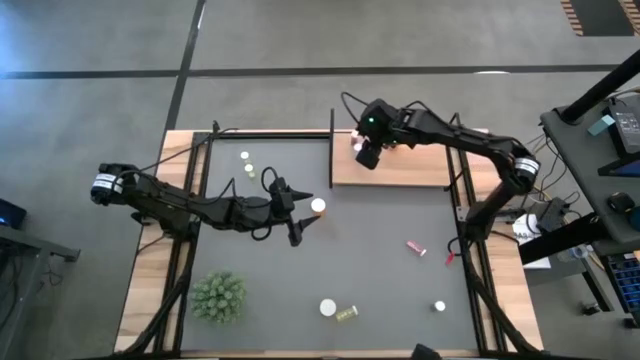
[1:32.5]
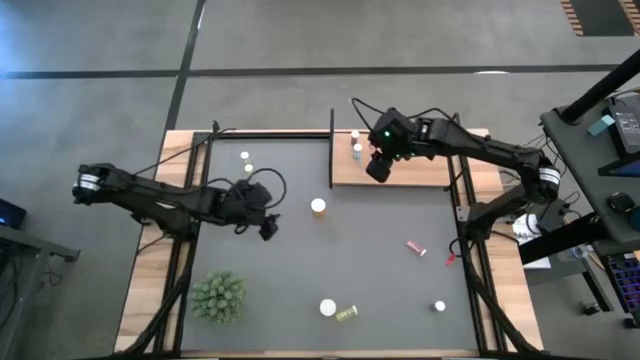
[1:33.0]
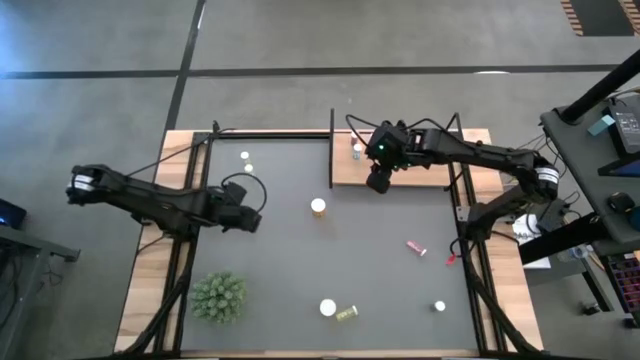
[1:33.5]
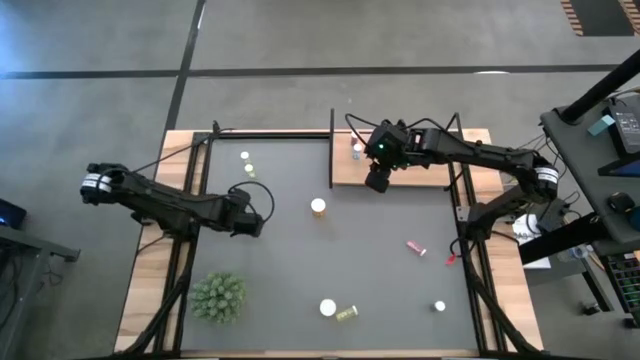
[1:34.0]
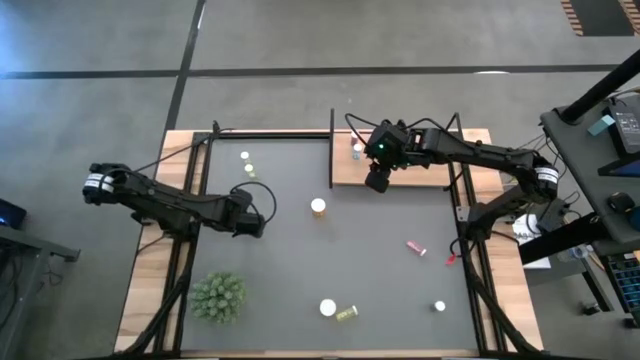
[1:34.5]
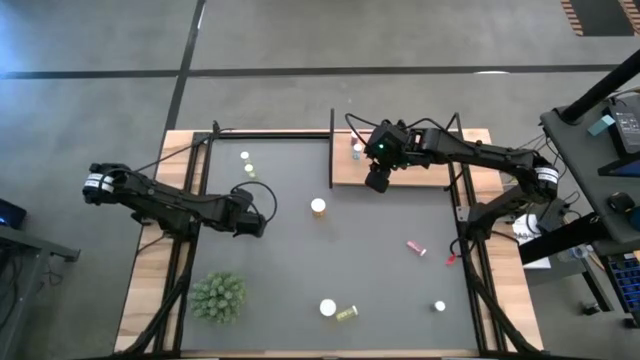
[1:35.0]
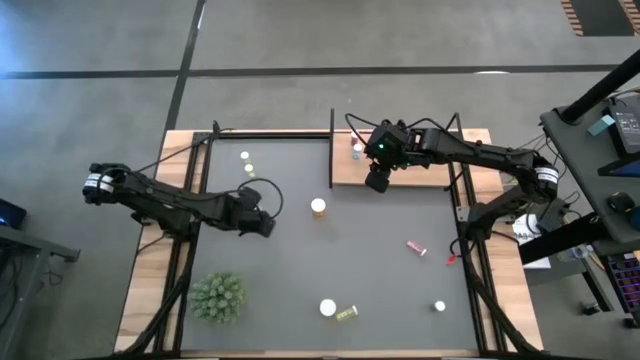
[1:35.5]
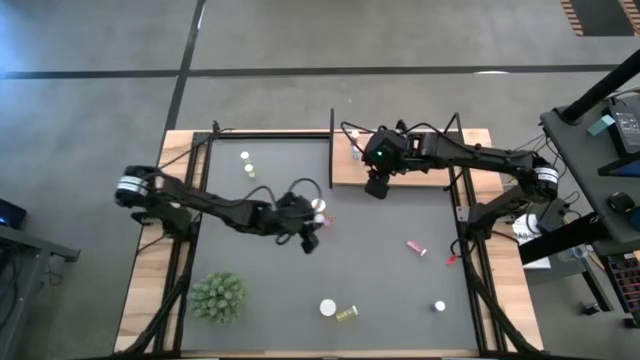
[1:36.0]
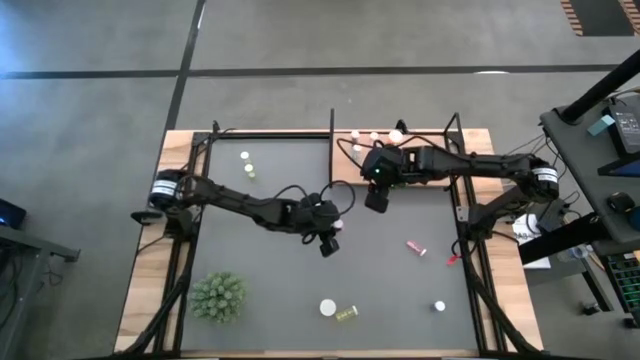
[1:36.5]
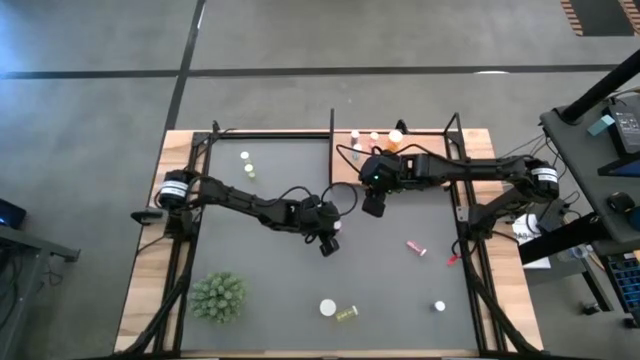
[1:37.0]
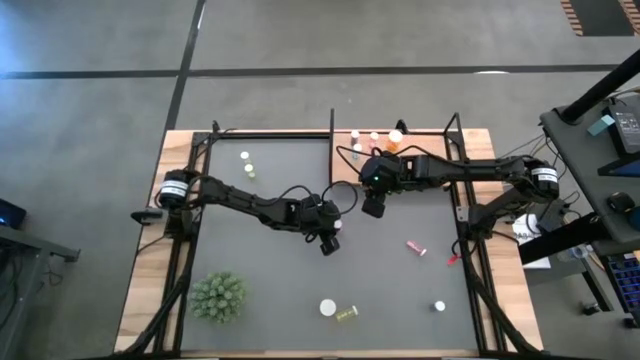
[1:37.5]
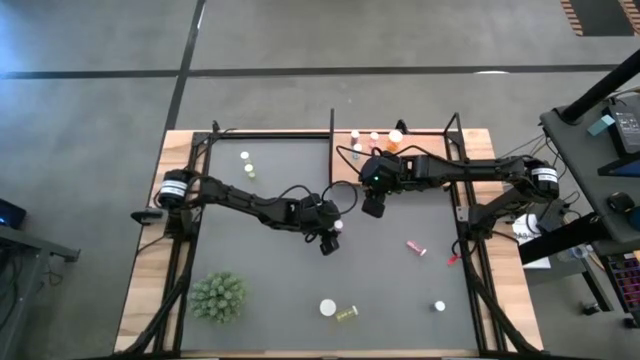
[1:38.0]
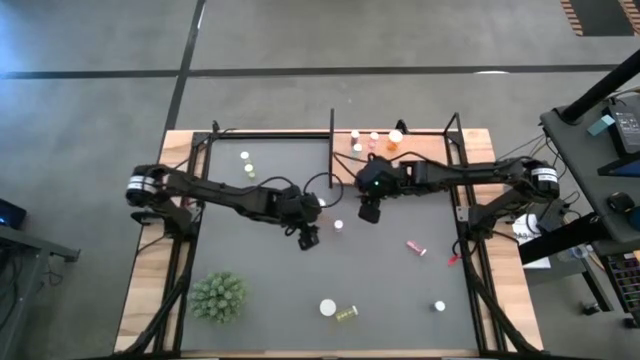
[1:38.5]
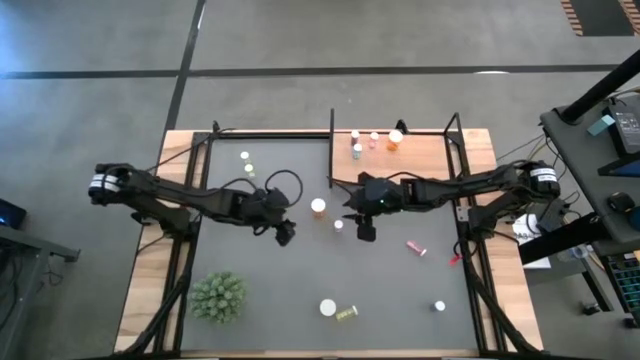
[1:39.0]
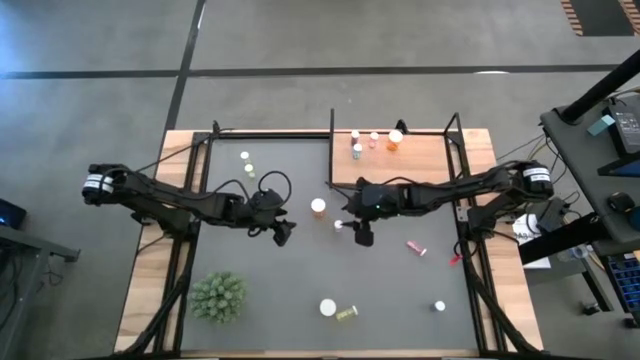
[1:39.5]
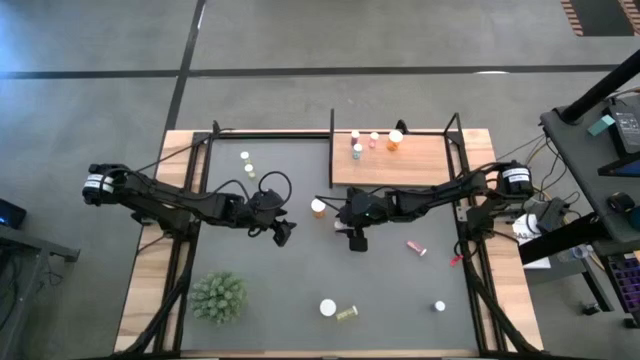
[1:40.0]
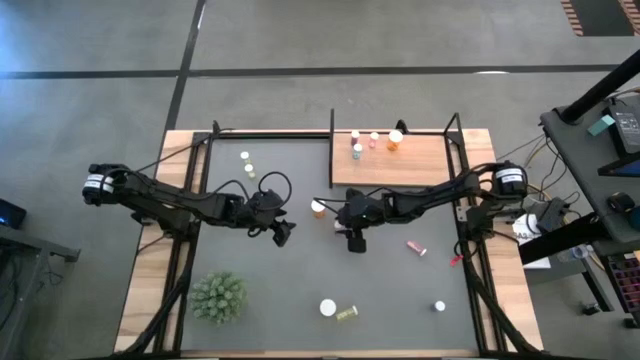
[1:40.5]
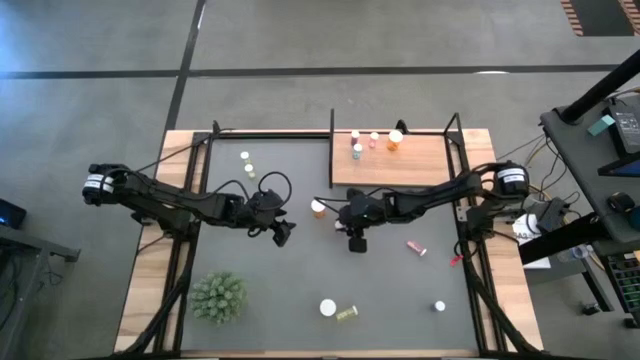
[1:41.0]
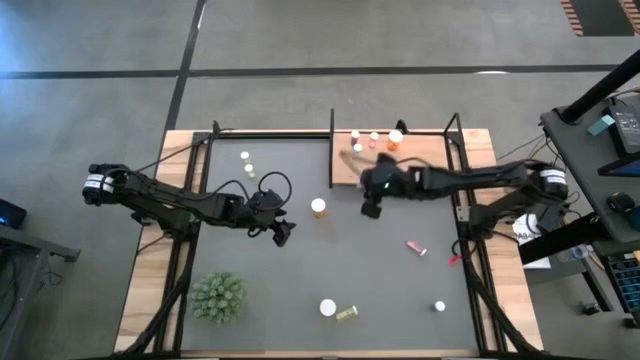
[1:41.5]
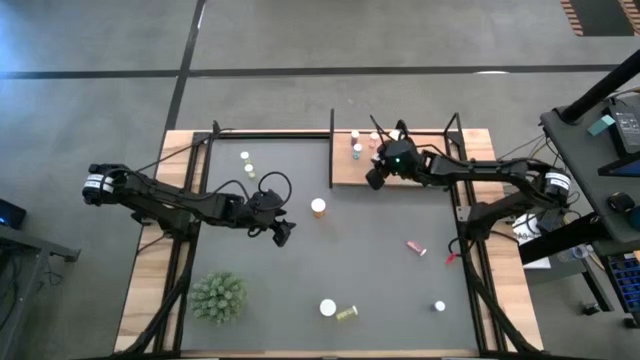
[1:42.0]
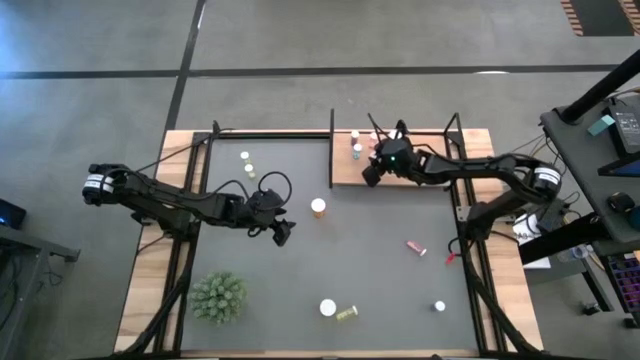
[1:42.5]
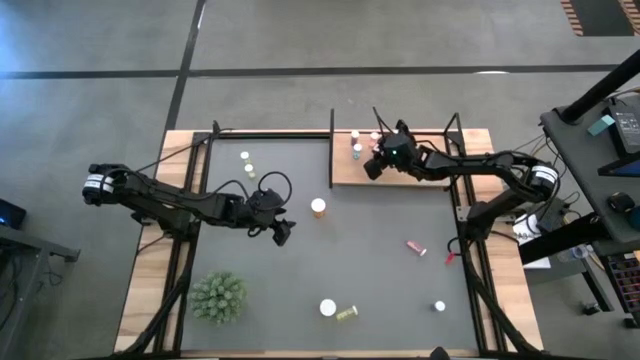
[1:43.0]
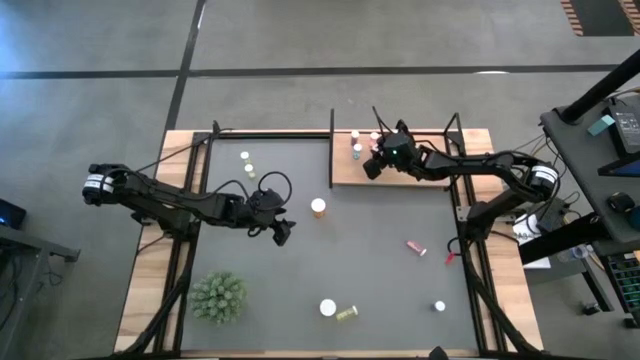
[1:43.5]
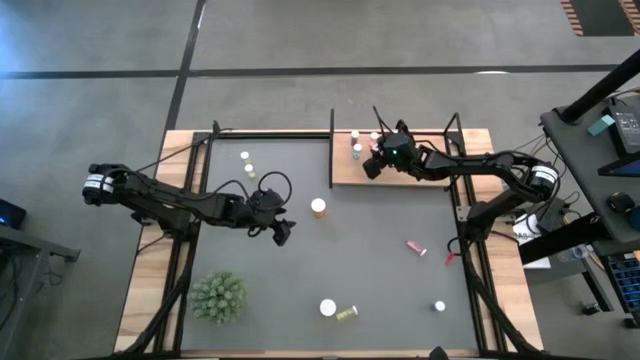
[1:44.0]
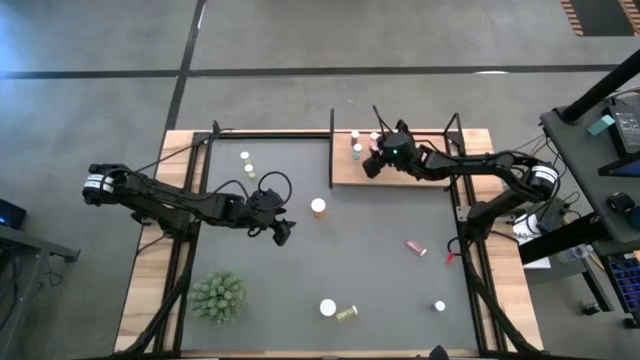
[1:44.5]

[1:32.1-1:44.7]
Task: Pick and place medicine bottles onto shelf by color
Put the left pink pill bottle on the shelf aligned with the other pink pill bottle

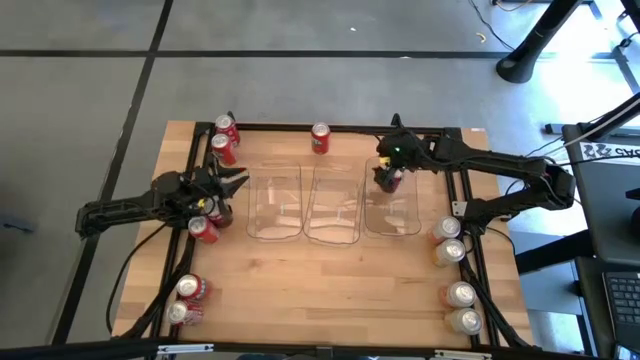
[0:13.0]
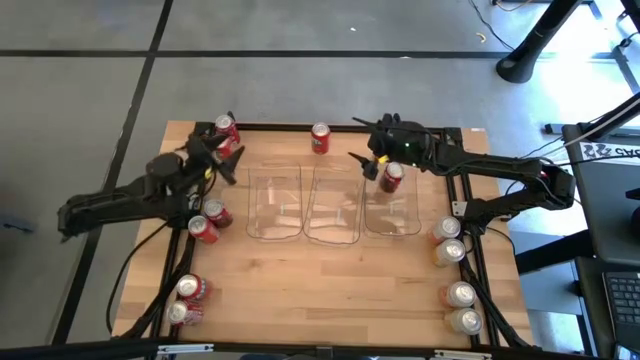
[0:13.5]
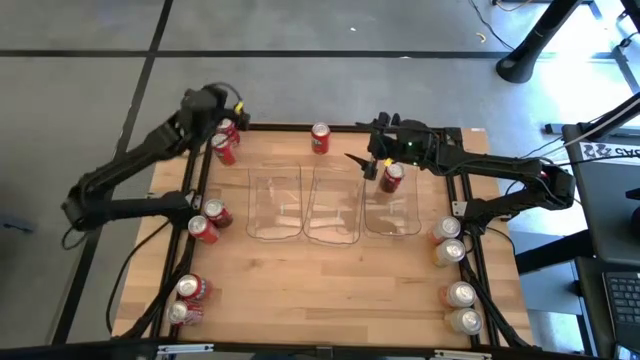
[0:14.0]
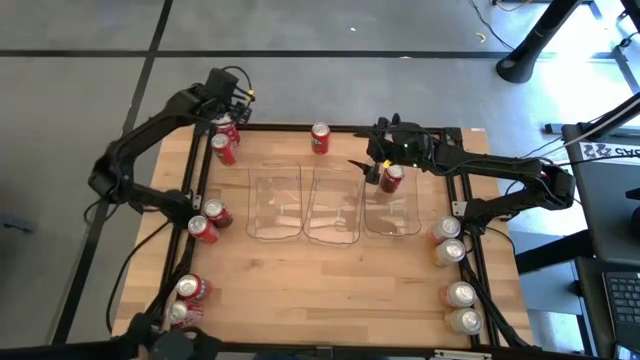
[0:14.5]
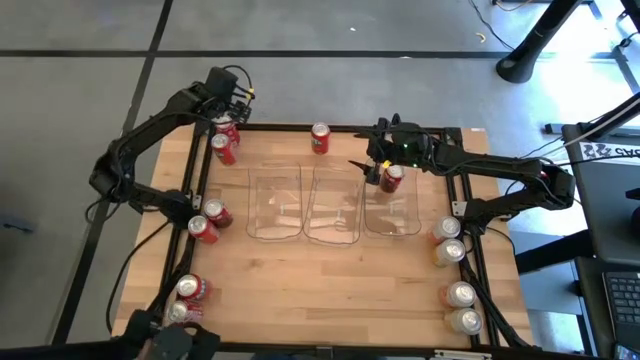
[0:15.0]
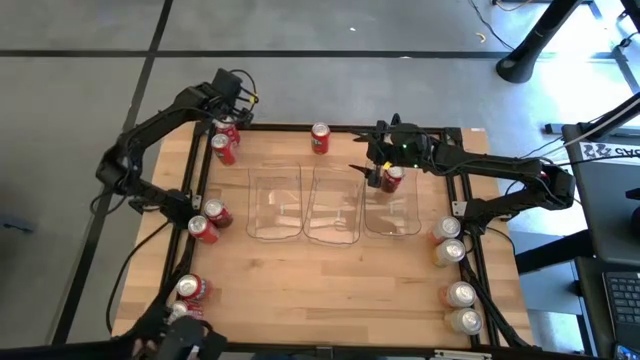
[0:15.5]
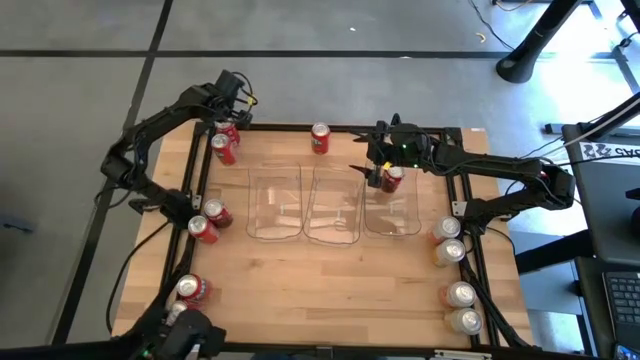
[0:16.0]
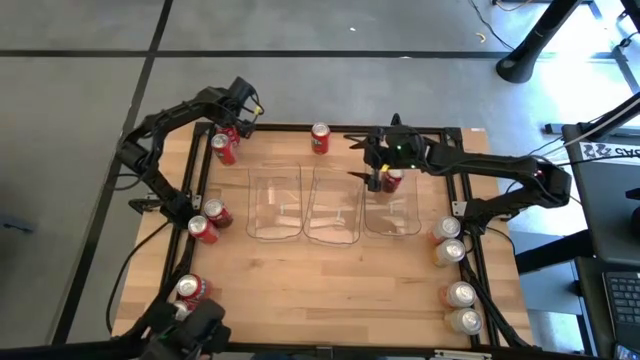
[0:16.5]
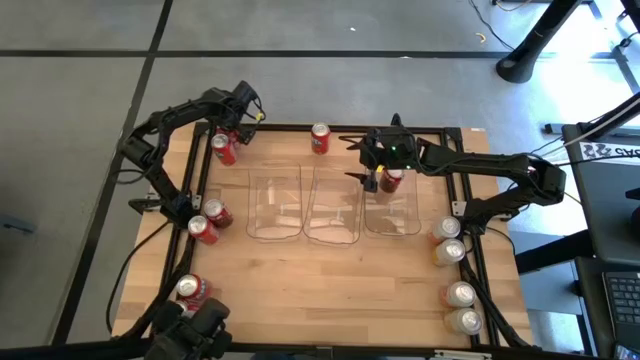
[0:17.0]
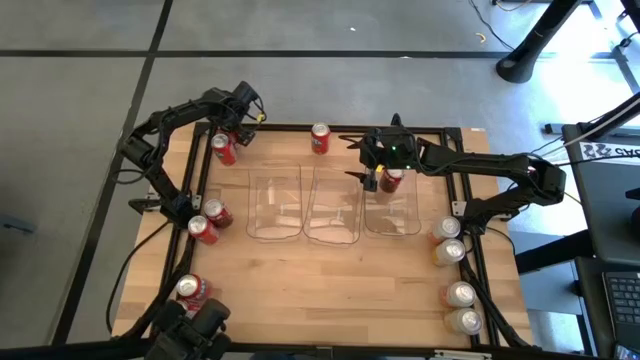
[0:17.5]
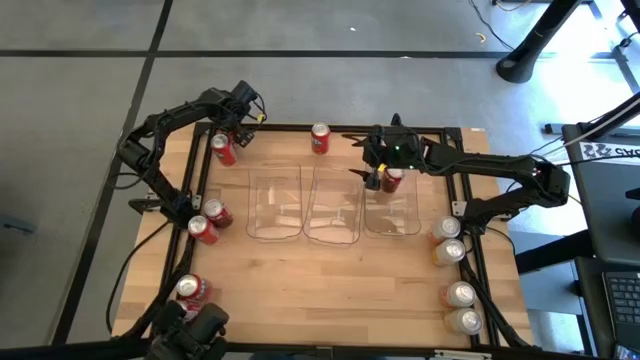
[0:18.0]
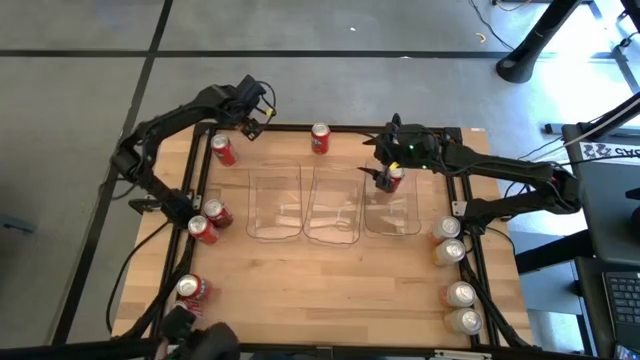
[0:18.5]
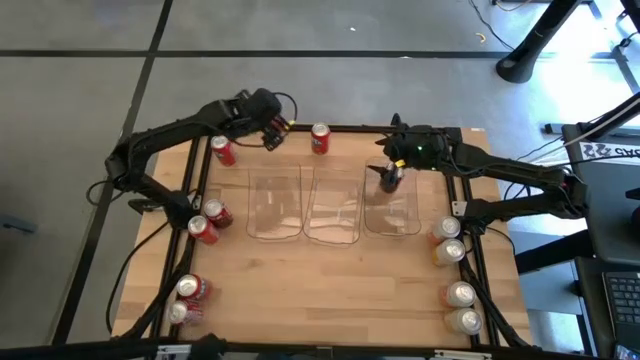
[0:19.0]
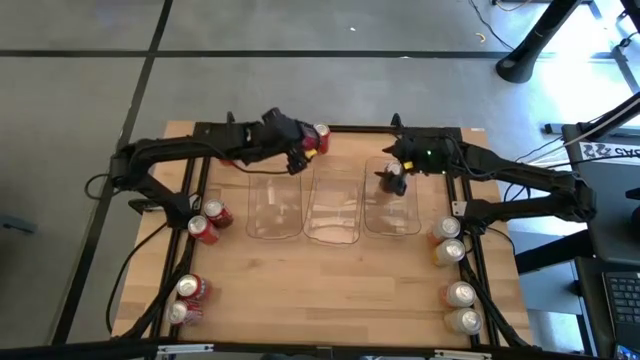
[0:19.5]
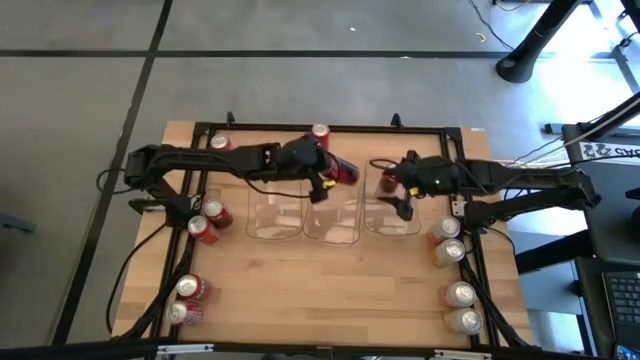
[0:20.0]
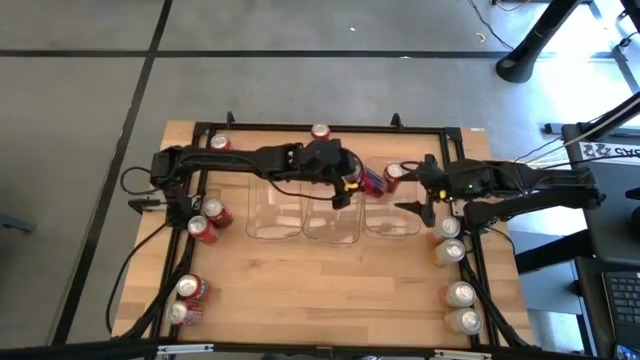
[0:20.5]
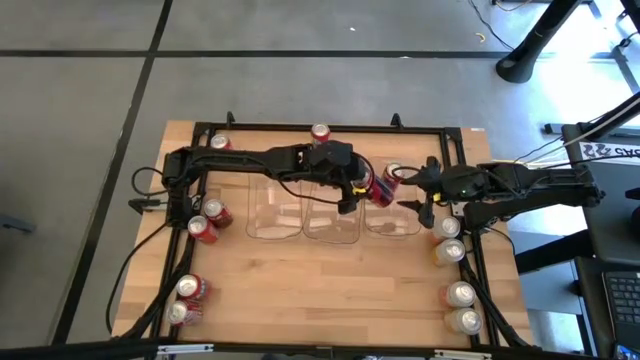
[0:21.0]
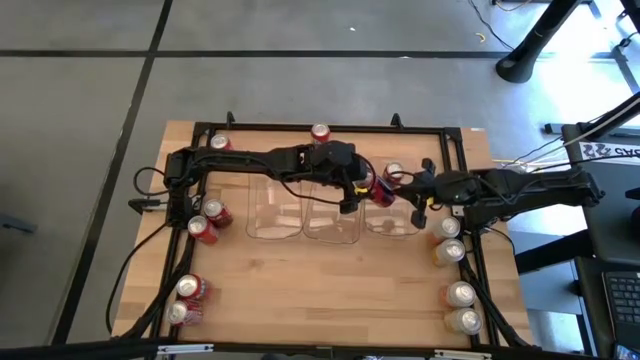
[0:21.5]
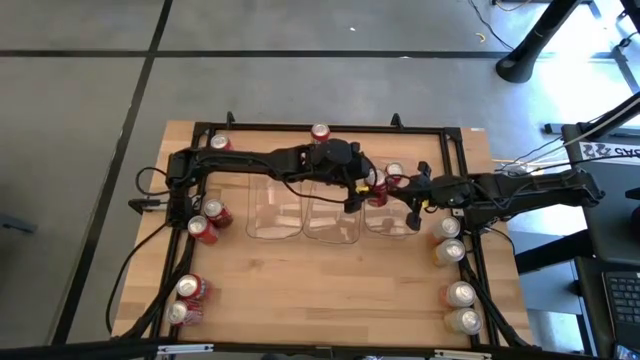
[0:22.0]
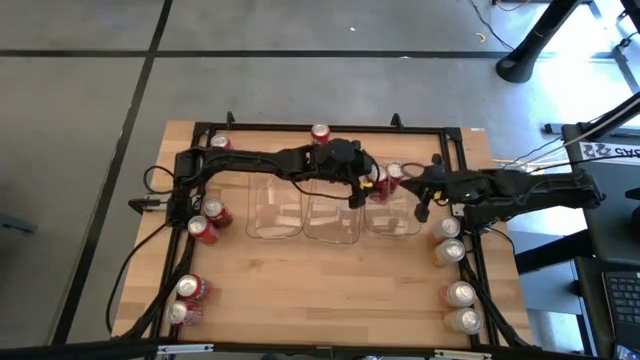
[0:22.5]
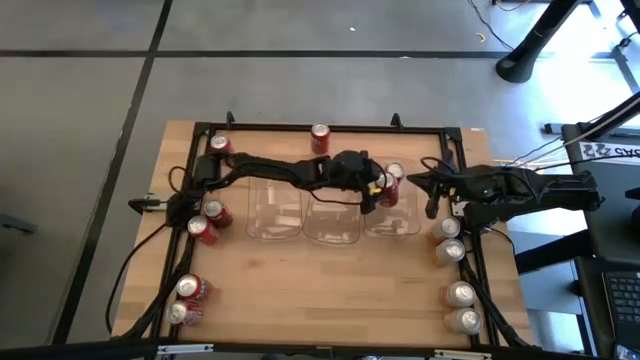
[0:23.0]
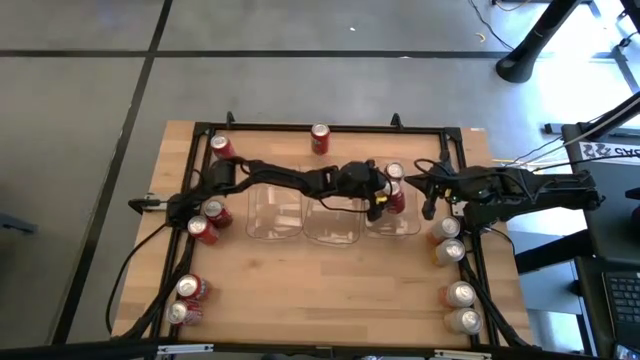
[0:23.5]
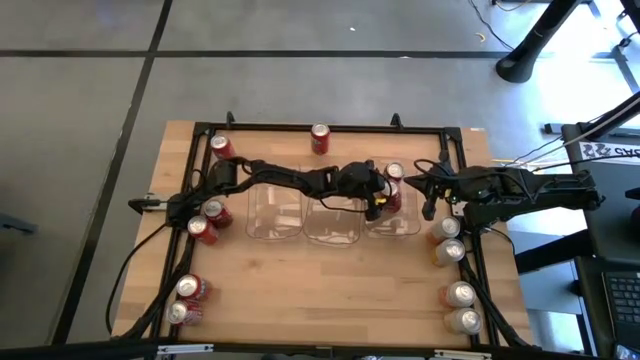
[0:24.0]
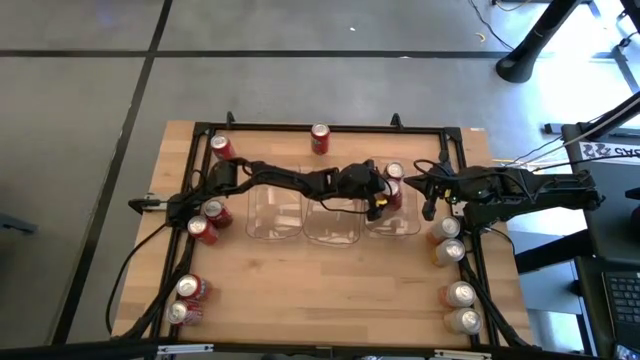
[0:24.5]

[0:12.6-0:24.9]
Task: Sort soda cans
Put the red soda can into the right transparent bin
